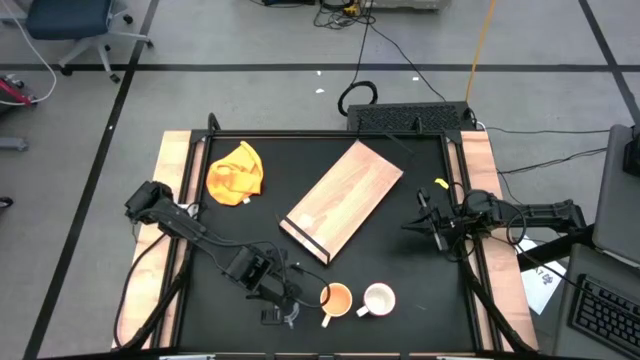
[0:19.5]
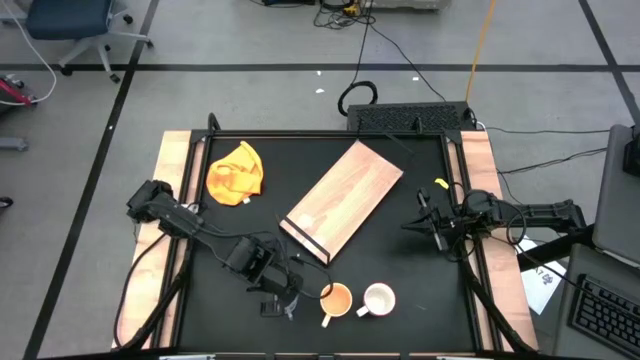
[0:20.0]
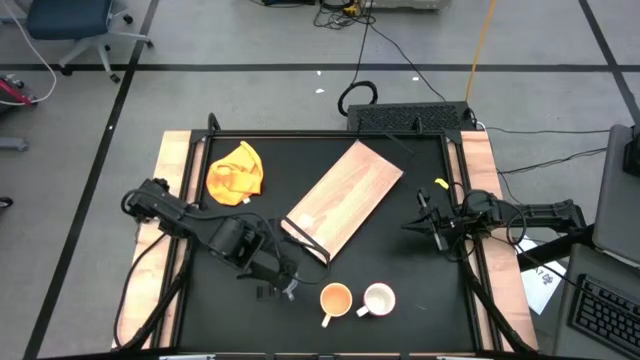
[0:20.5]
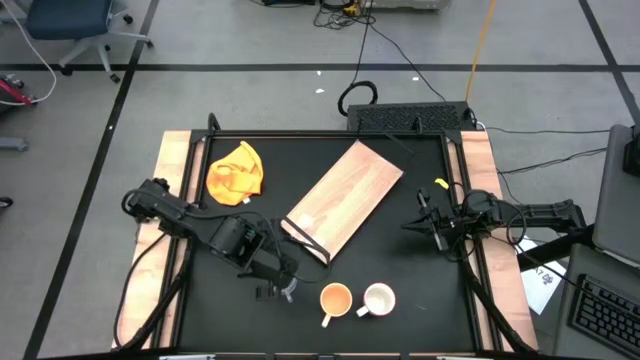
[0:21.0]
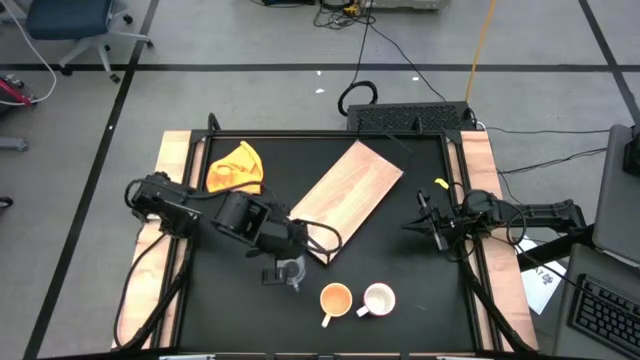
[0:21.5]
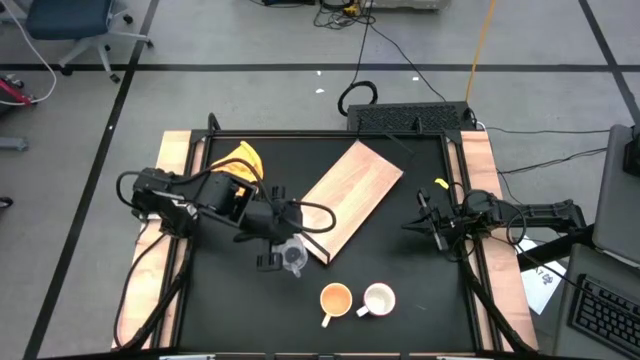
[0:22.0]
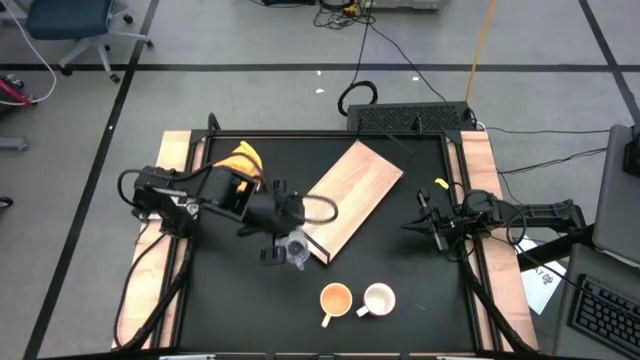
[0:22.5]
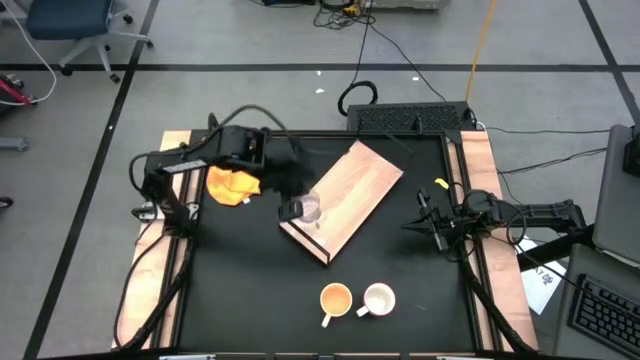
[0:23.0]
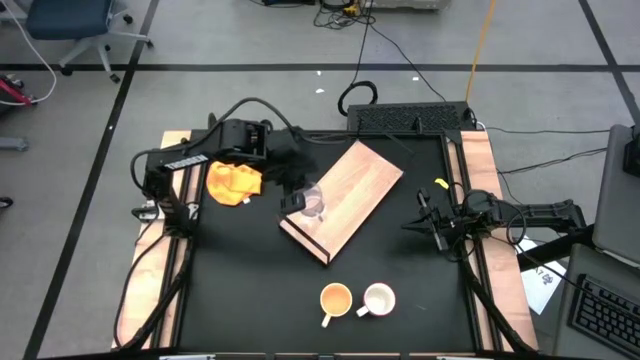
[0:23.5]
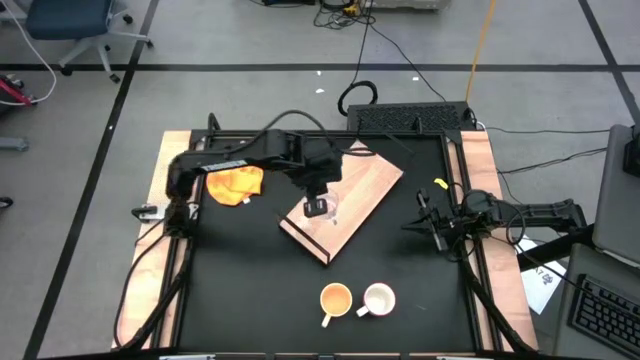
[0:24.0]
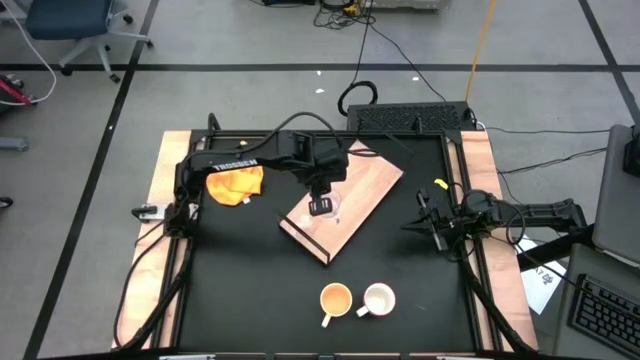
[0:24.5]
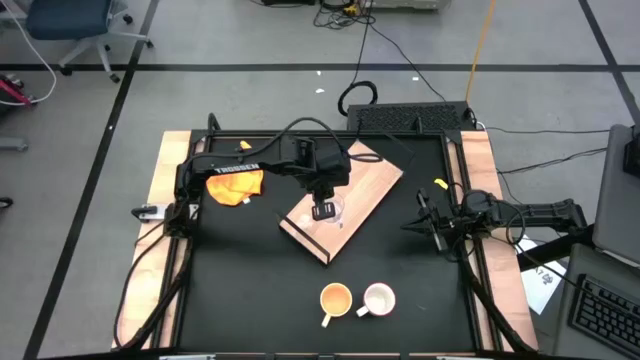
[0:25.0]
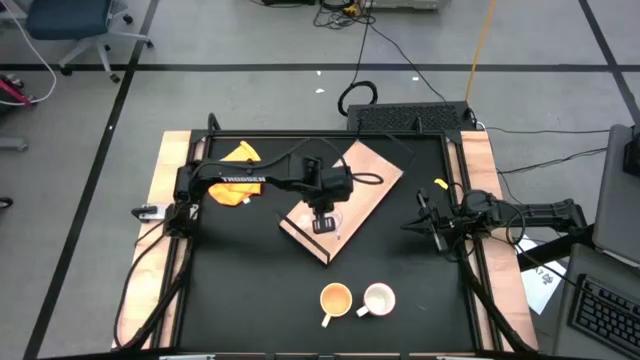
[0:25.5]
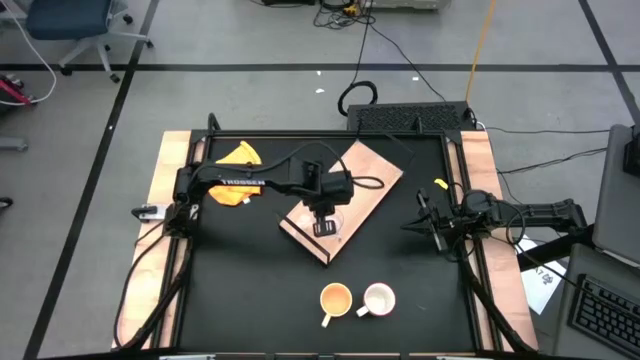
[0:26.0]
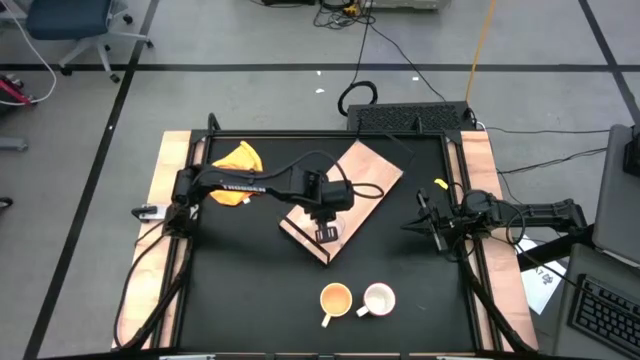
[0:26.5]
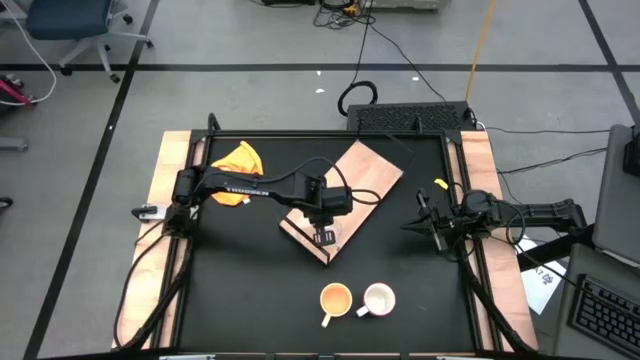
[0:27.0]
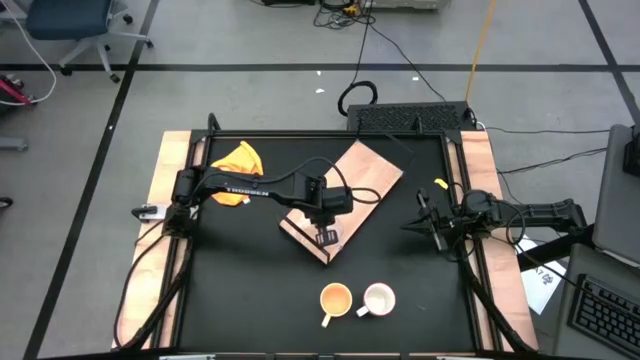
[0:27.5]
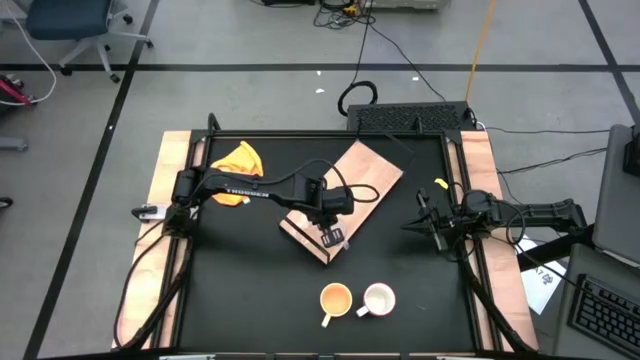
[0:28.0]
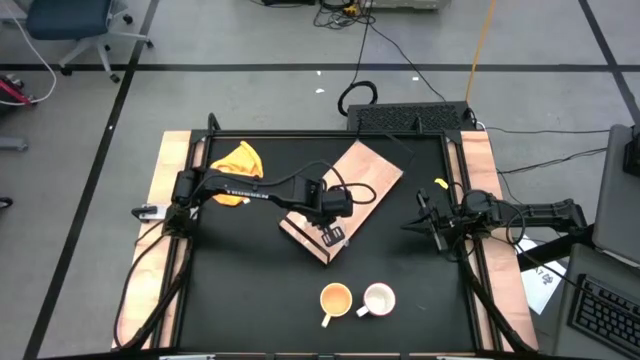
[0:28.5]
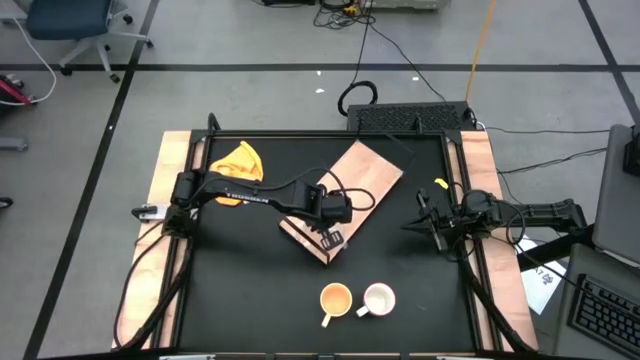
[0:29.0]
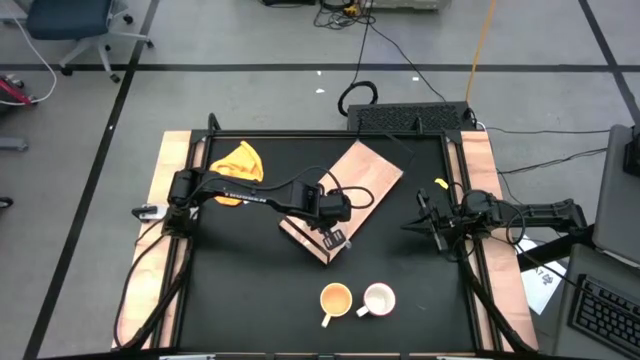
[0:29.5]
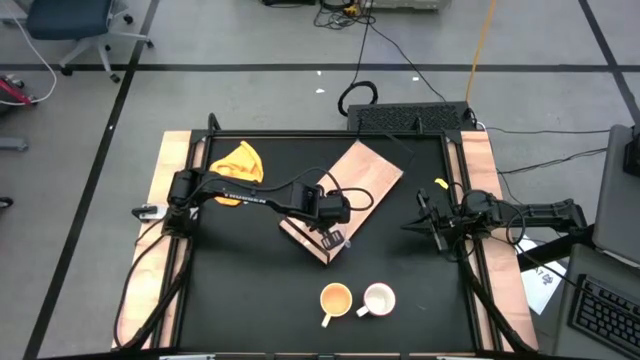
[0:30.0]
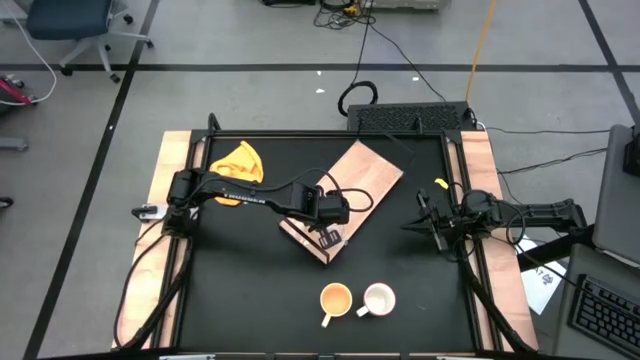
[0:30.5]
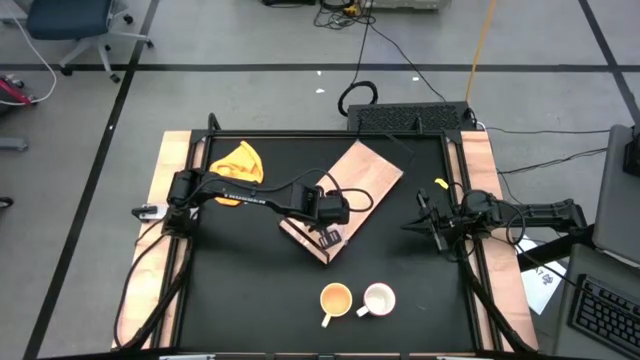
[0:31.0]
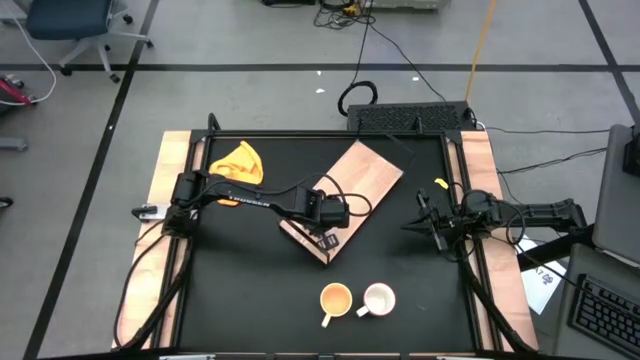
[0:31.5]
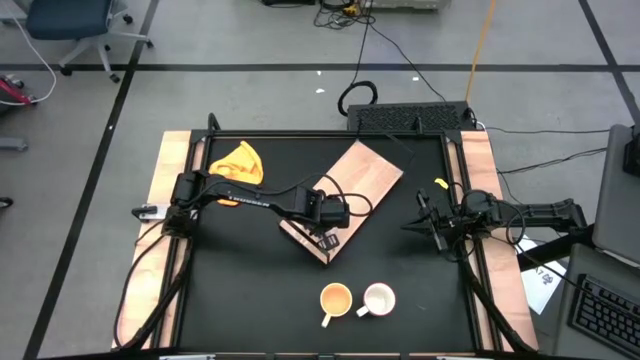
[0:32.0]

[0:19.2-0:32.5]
Task: Stack small to large cups/mugs on shelf
Put the transparent mug on the shelf

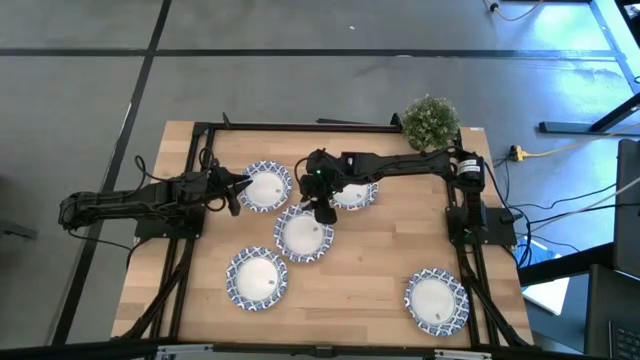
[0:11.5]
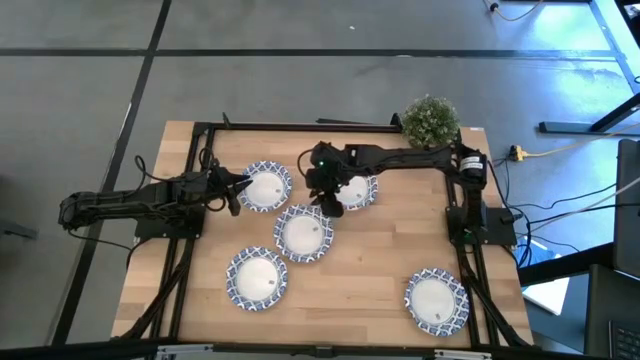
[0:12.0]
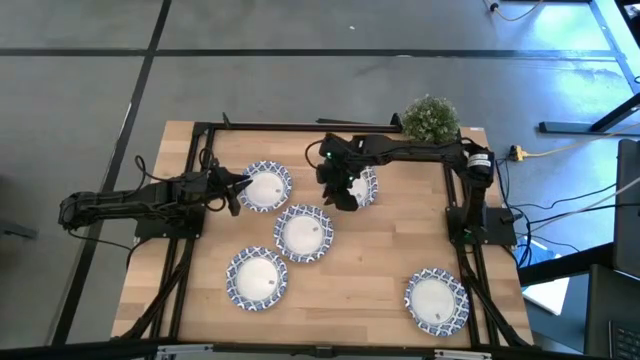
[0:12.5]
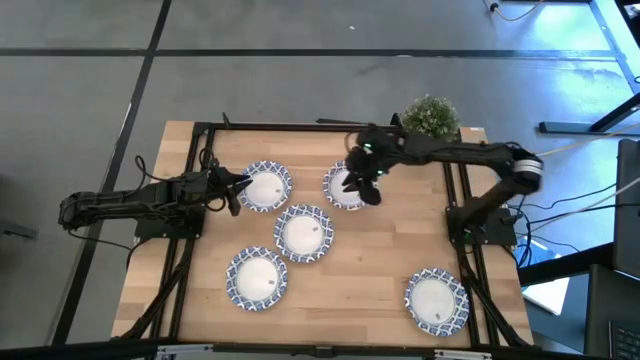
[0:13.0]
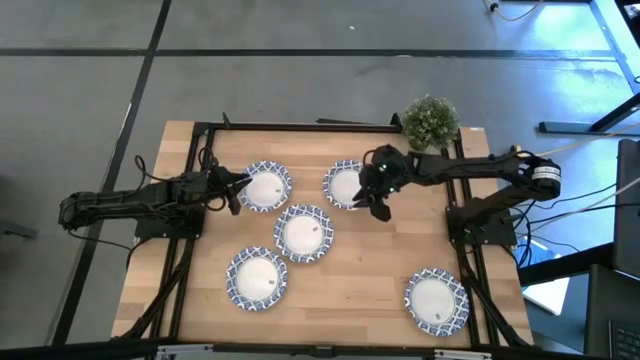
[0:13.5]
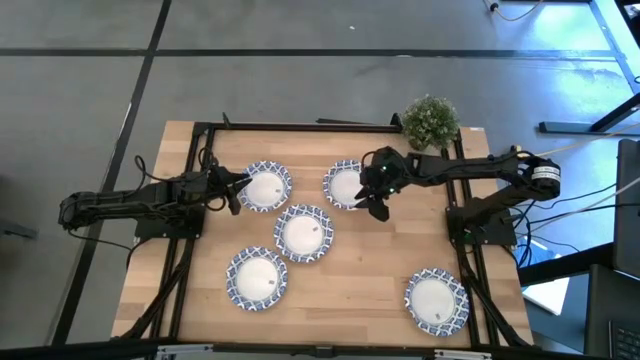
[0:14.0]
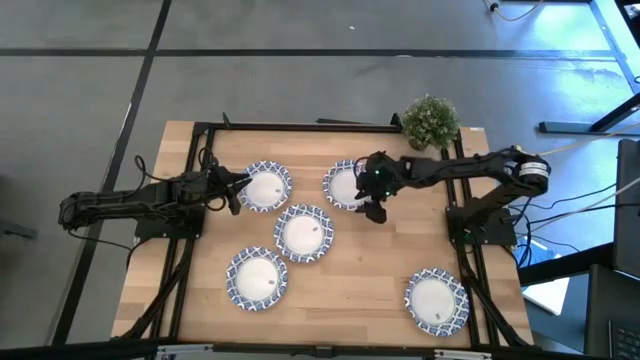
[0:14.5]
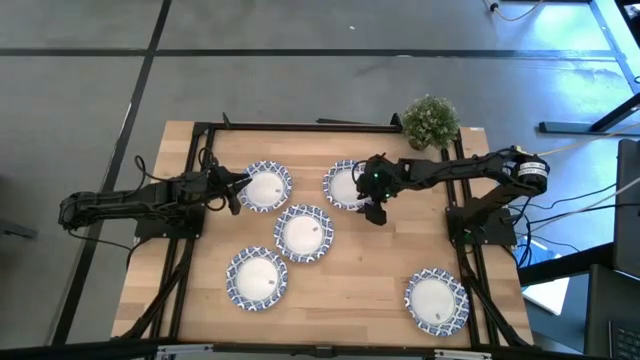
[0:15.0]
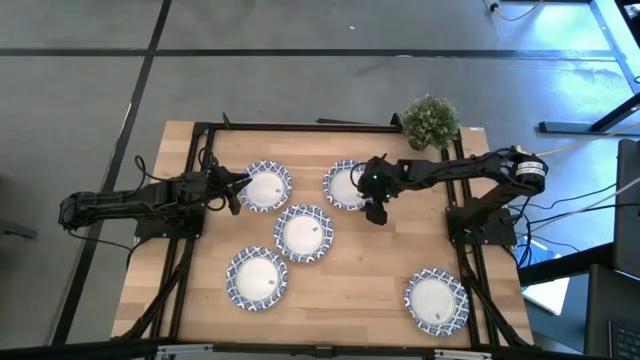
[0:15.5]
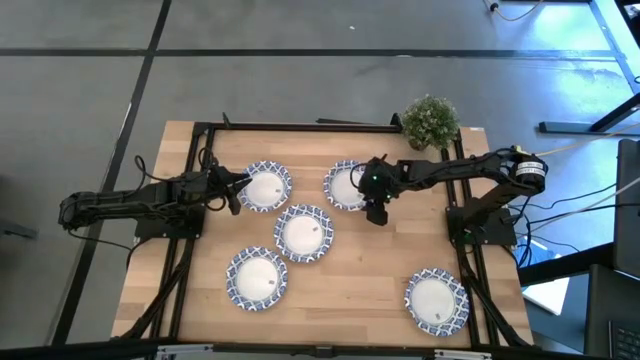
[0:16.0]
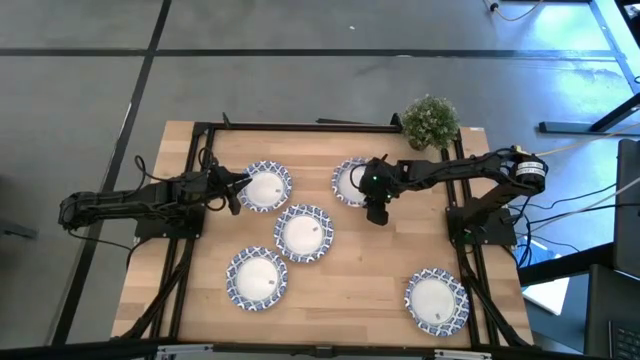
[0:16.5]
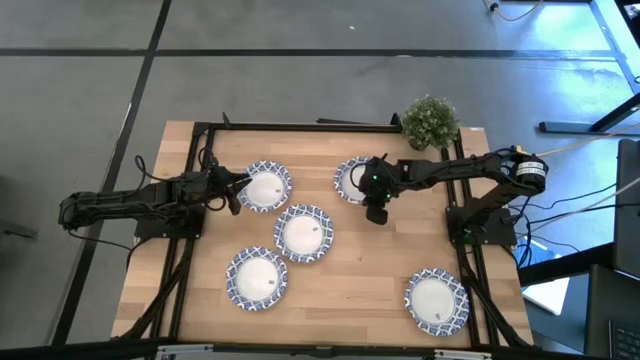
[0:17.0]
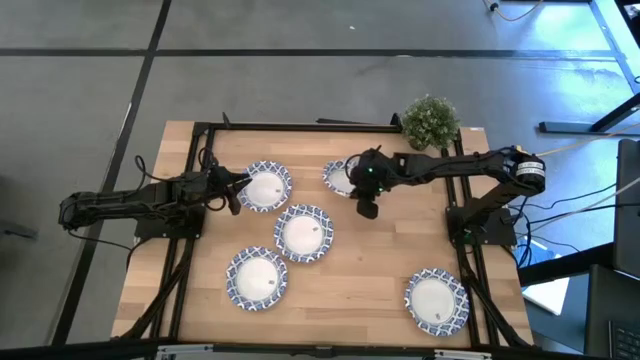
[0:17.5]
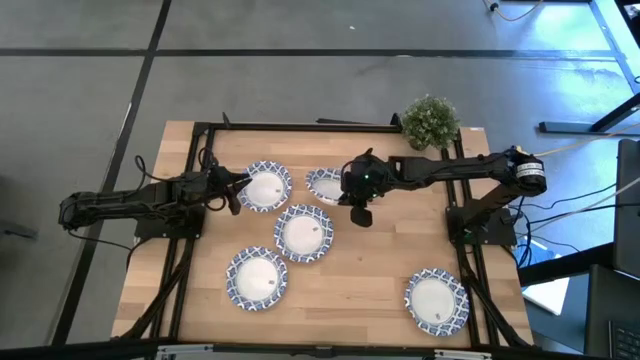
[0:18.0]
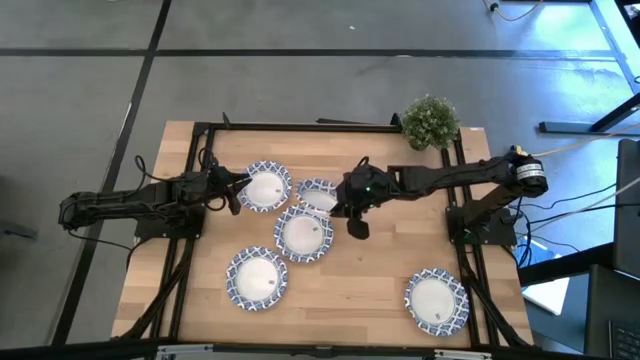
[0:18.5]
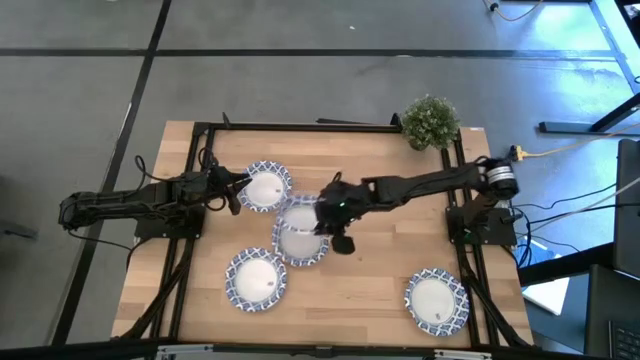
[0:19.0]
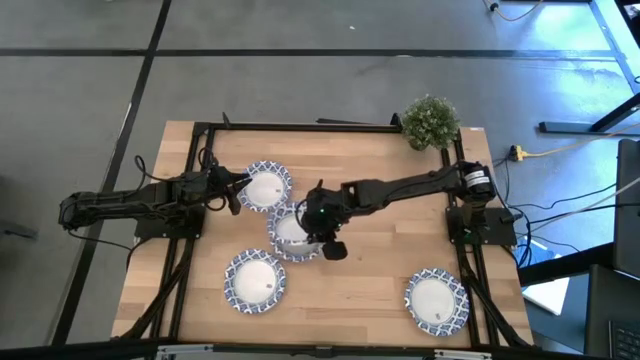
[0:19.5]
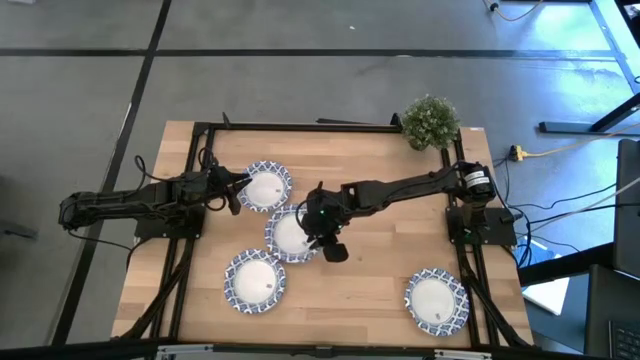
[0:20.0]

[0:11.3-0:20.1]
Task: Nest bowls inside each other
Stack the white patterned bowl on top of the other white patterned bowls
